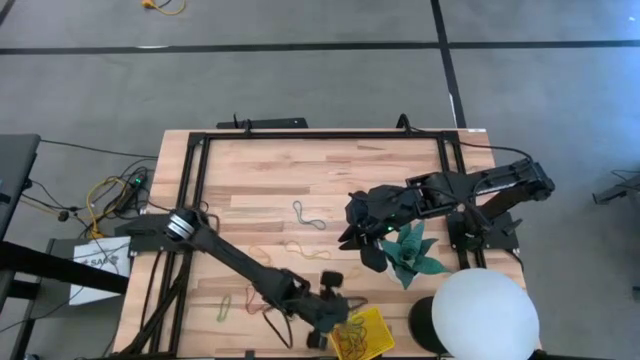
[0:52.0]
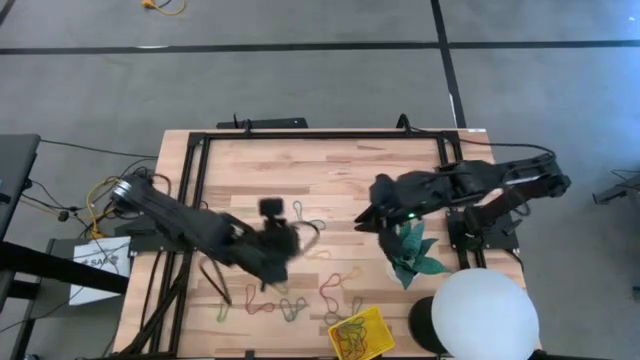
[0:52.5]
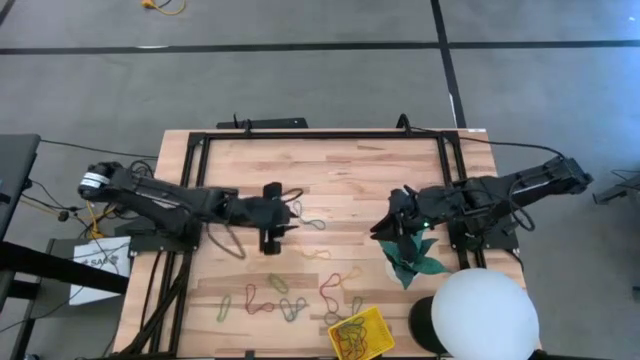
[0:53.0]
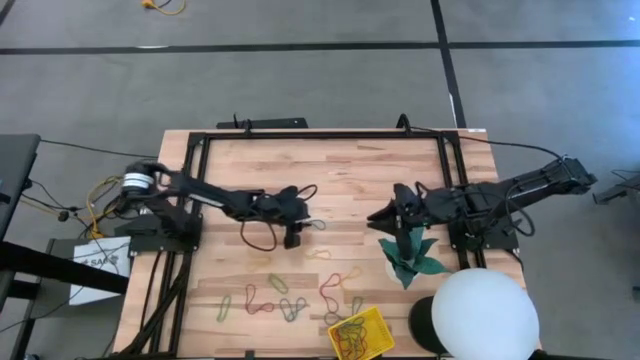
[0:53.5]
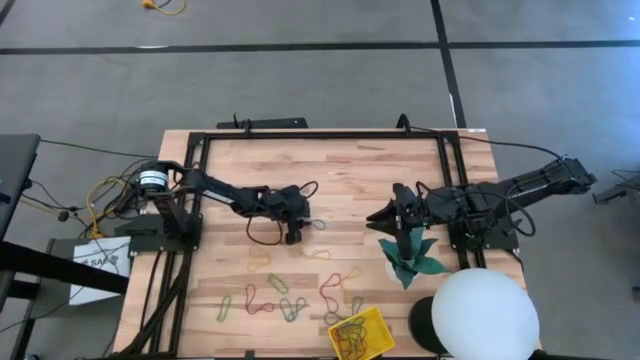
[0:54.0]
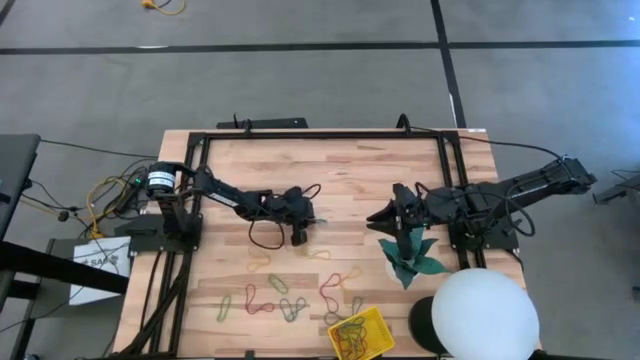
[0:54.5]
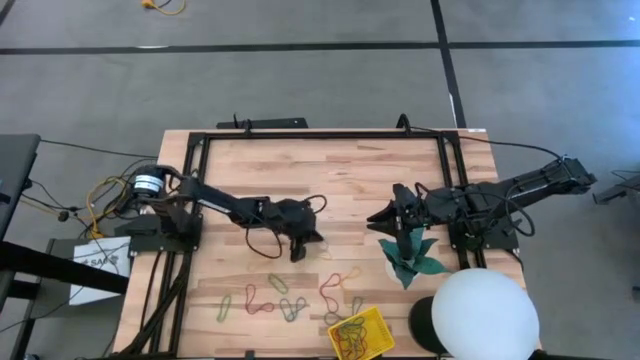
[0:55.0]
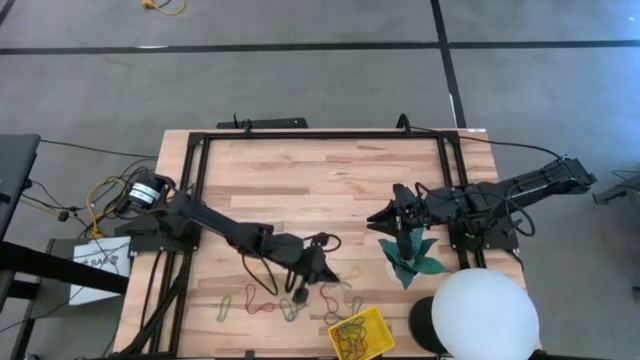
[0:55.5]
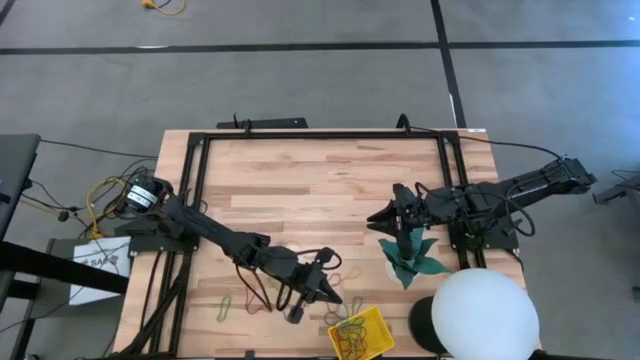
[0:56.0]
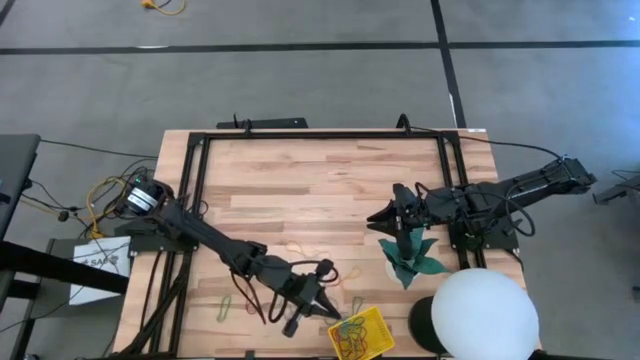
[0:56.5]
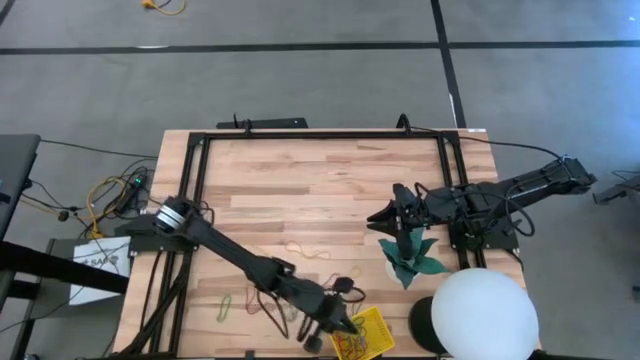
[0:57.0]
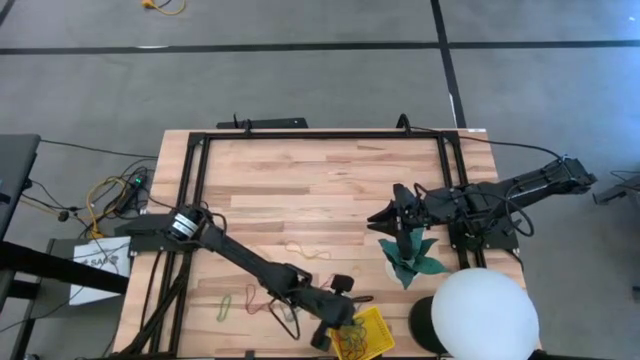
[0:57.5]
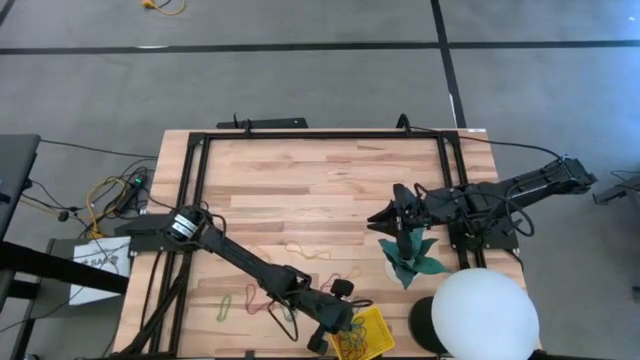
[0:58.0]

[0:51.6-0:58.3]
Task: Pick and place items into bin
Put the blue rubber band into the yellow bin

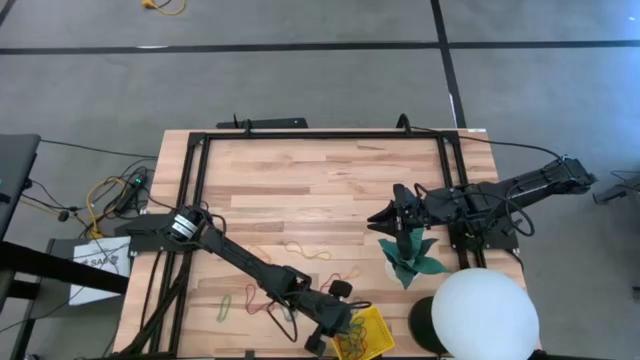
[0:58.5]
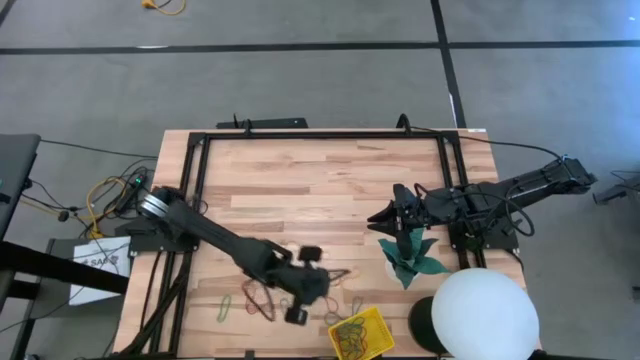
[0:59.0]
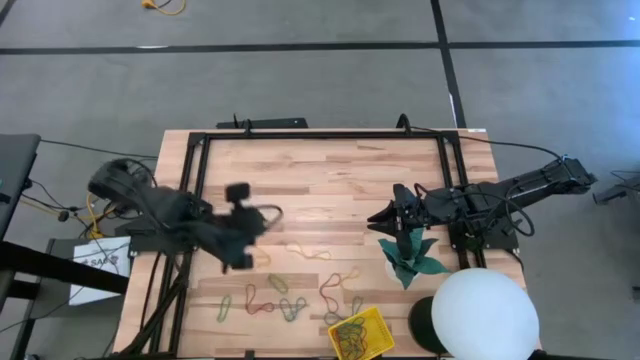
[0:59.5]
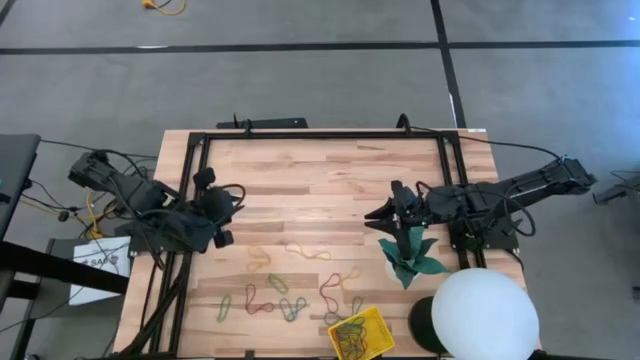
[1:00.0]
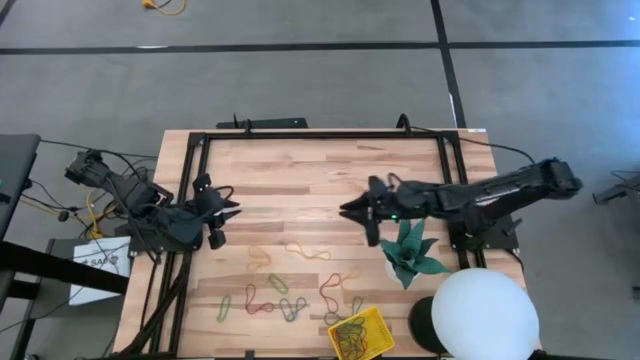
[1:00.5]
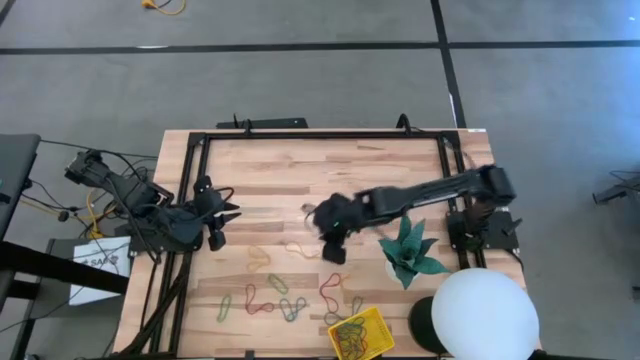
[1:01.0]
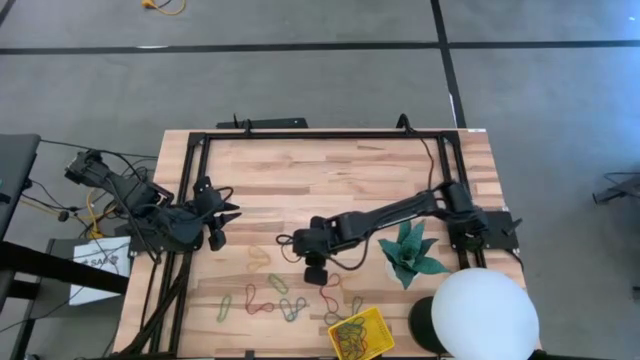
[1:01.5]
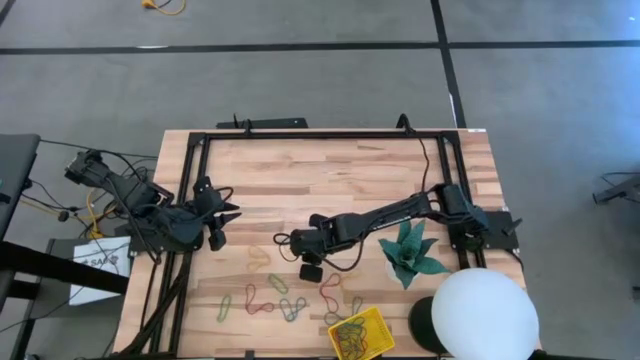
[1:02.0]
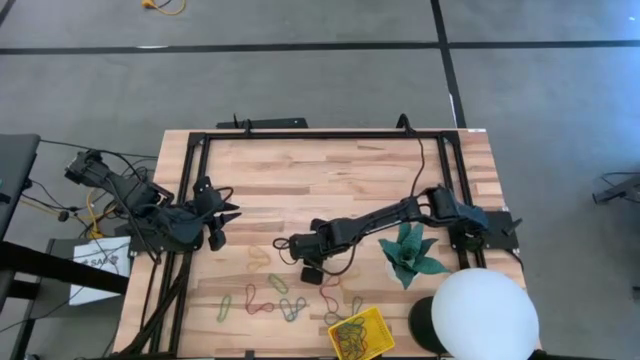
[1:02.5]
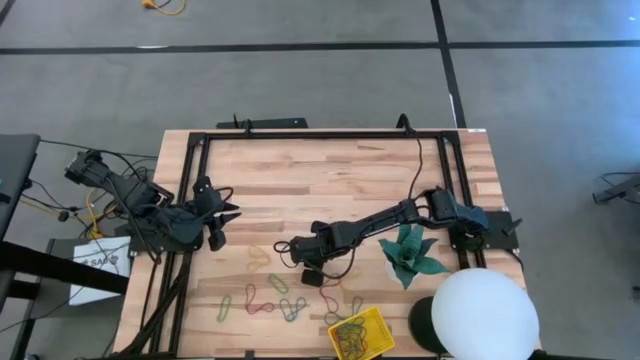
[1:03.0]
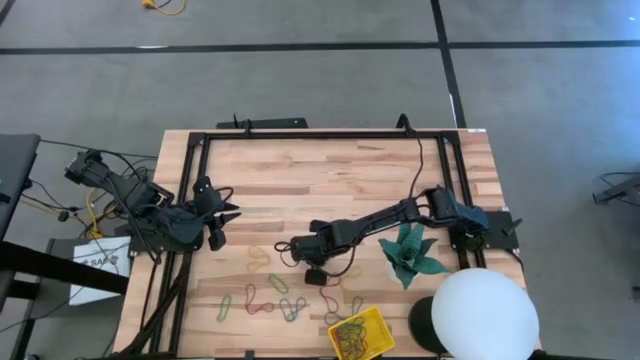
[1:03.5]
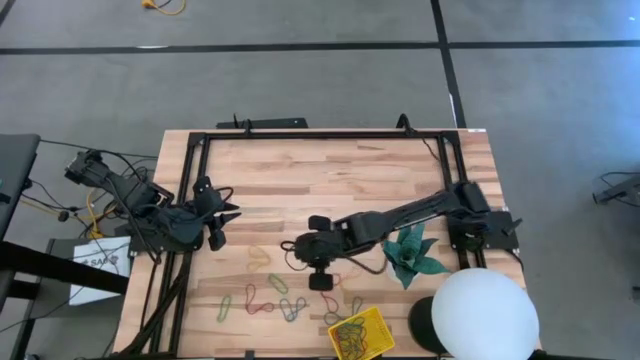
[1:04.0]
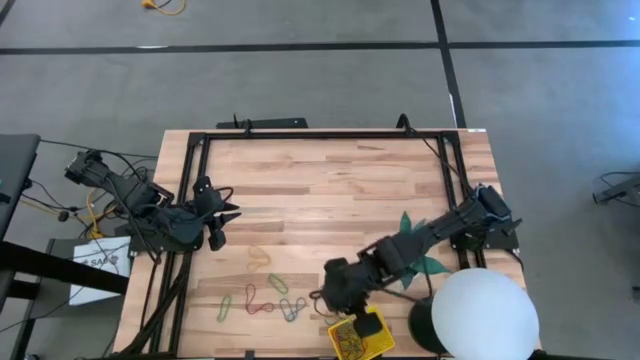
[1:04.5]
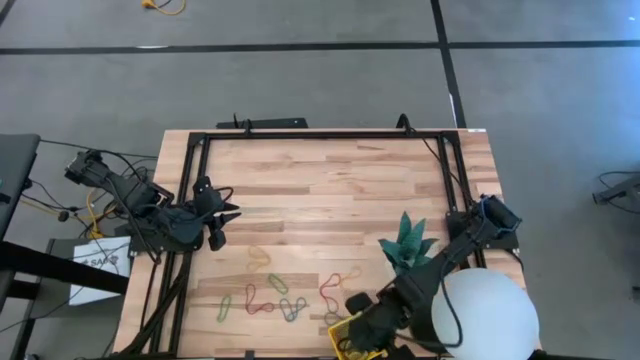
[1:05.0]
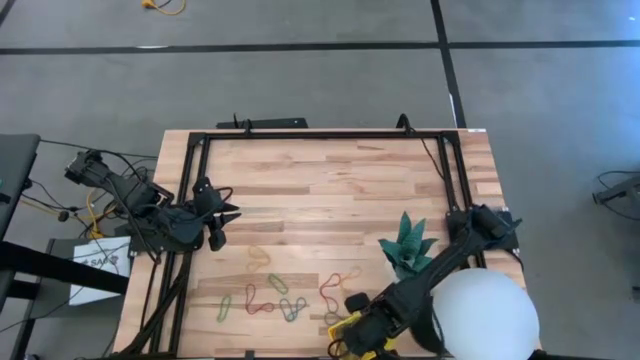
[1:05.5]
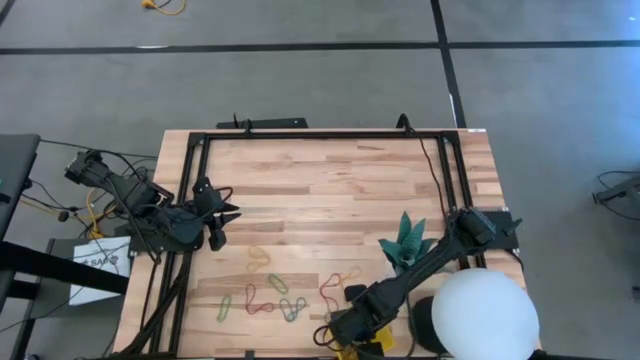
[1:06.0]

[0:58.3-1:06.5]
Put the yellow rubber band into the yellow bin

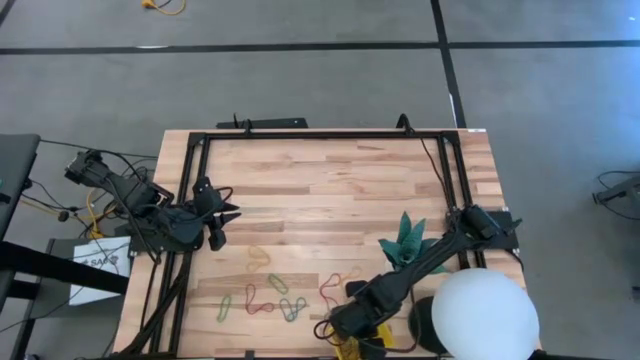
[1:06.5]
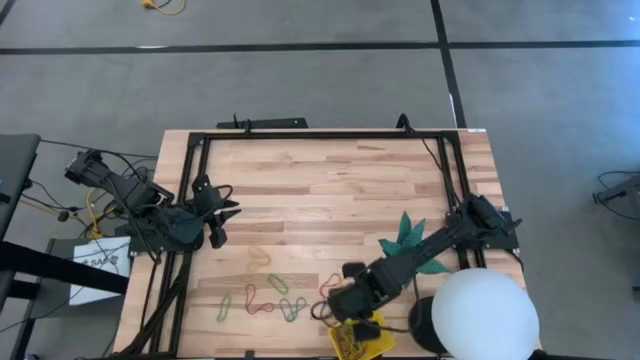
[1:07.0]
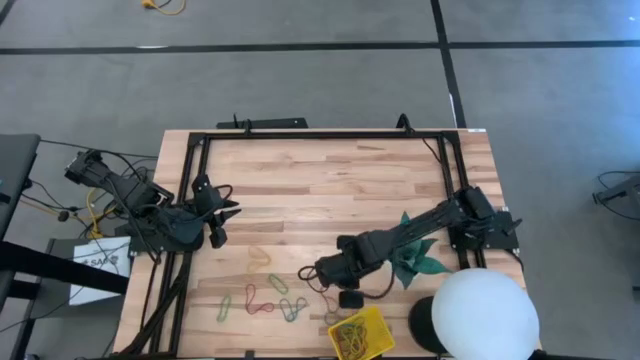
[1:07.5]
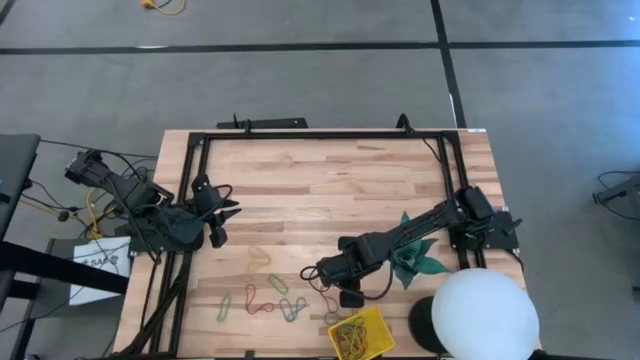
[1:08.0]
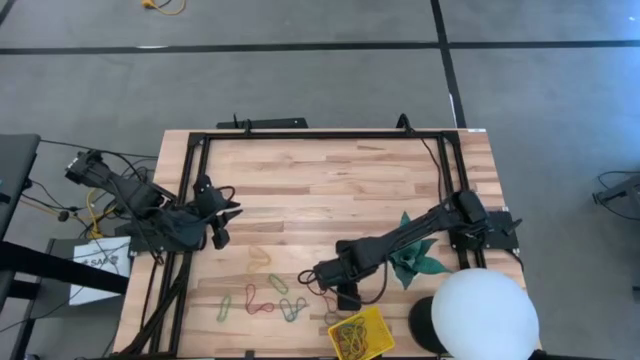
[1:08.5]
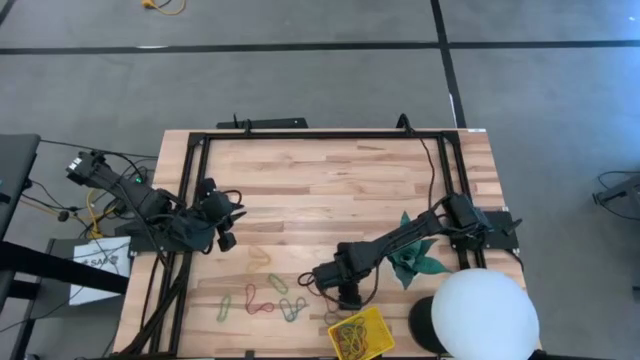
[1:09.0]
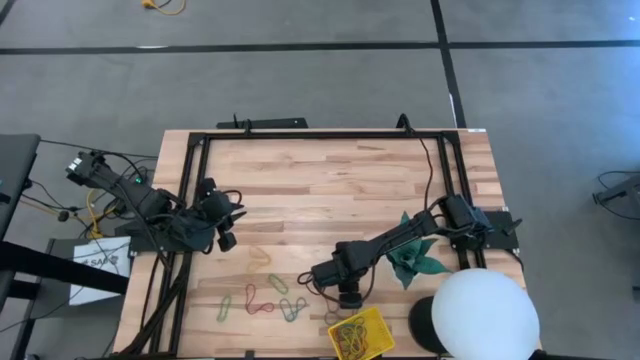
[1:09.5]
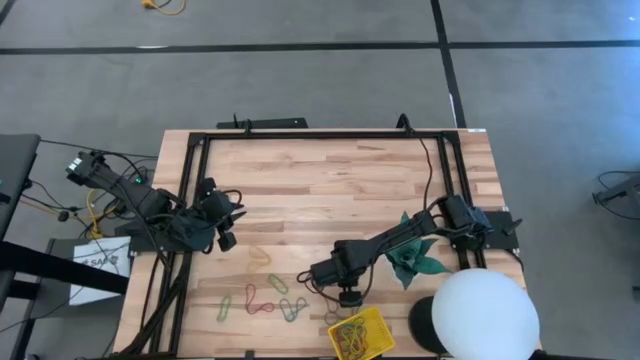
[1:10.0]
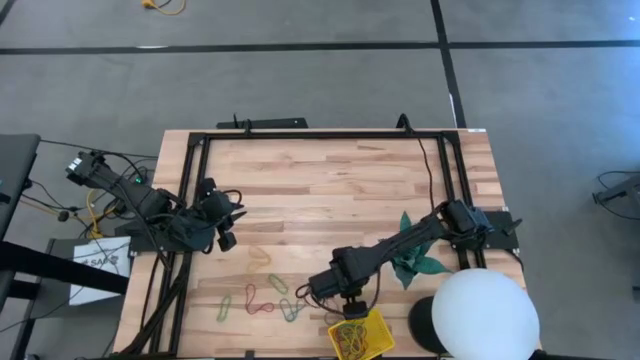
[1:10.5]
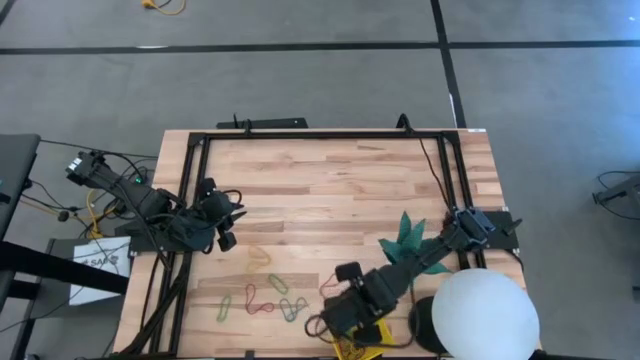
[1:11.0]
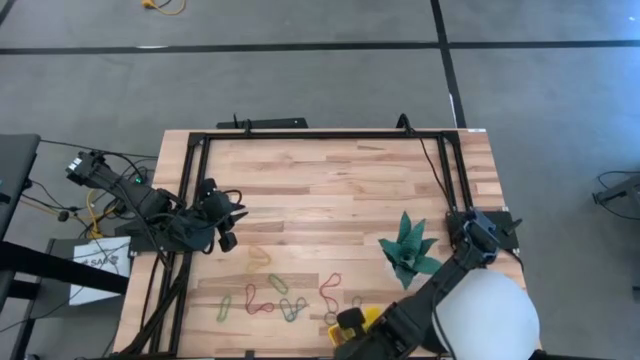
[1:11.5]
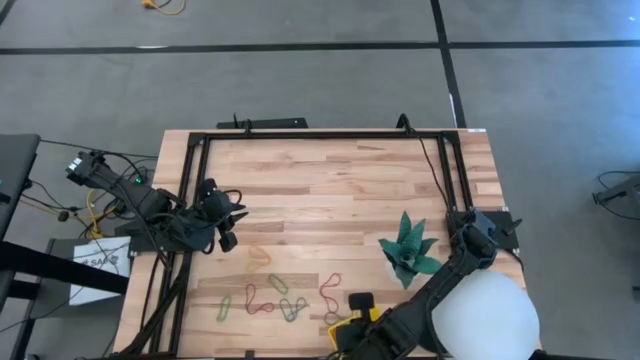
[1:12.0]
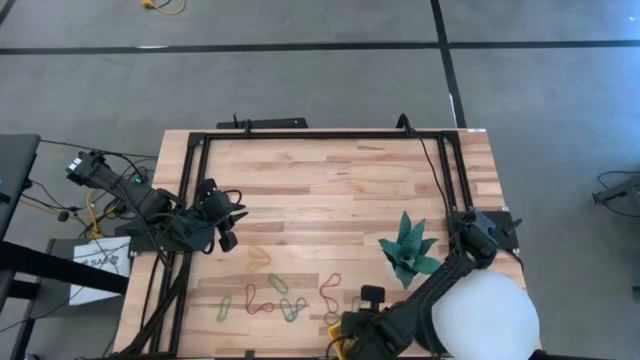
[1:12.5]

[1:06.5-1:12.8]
Put the yellow rubber band into the yellow bin

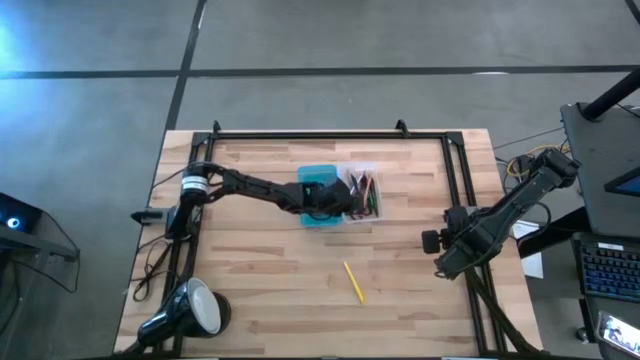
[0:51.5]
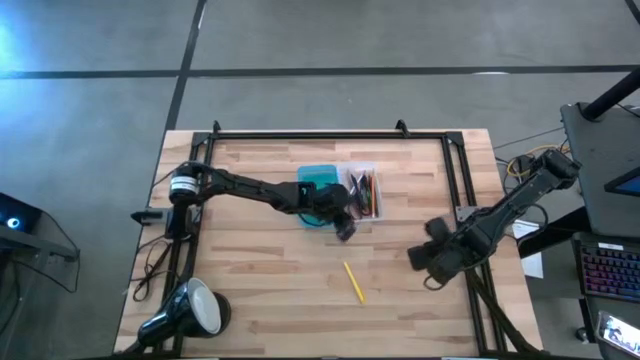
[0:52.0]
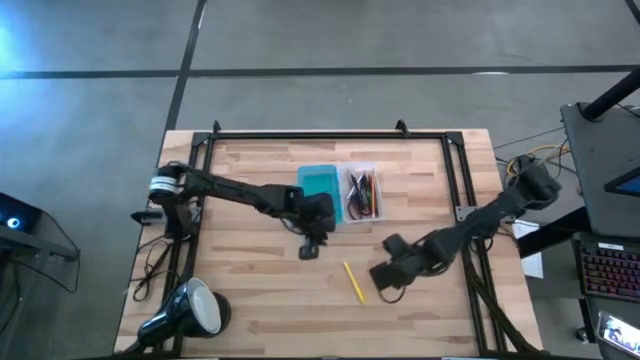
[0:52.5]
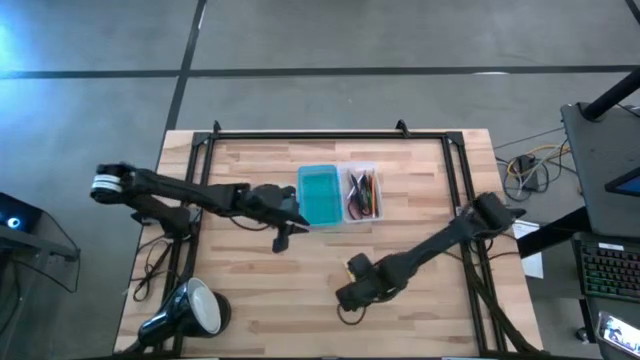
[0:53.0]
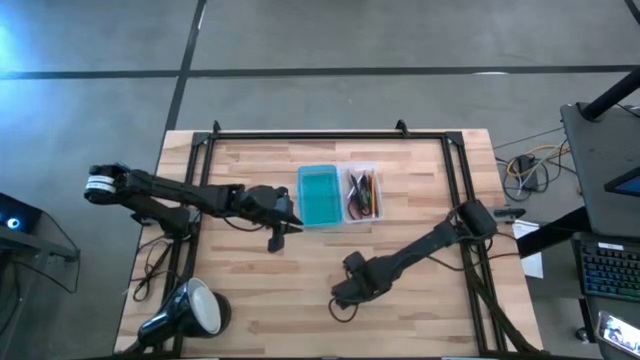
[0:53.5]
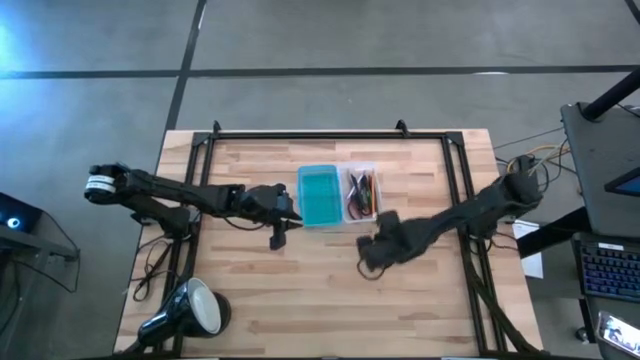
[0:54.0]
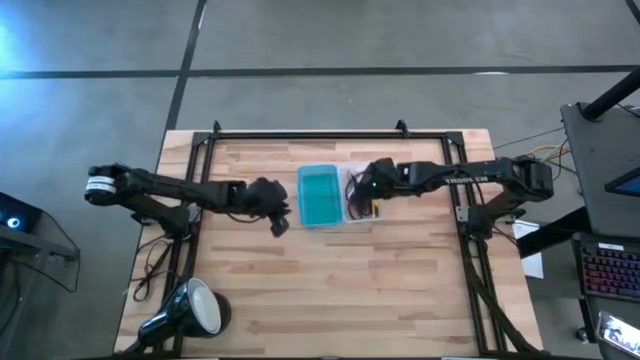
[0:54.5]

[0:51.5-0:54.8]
Task: Pick & place school supplies into a supply box
Put the yellow pen into the blue supply box
